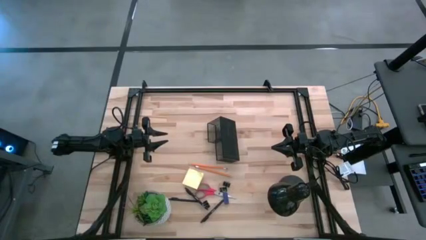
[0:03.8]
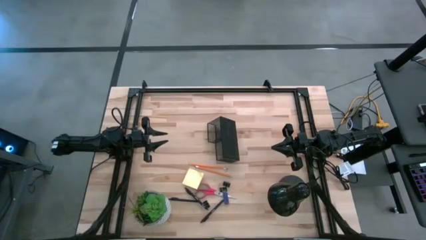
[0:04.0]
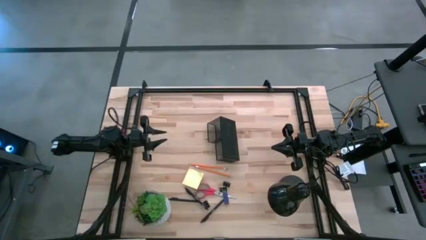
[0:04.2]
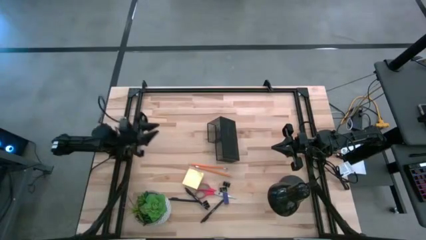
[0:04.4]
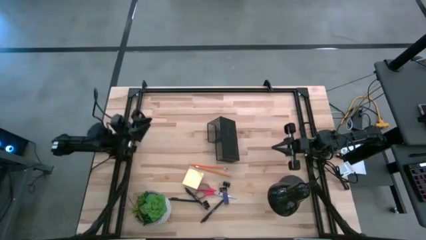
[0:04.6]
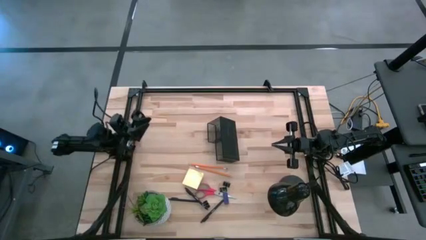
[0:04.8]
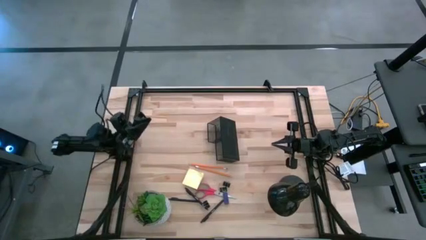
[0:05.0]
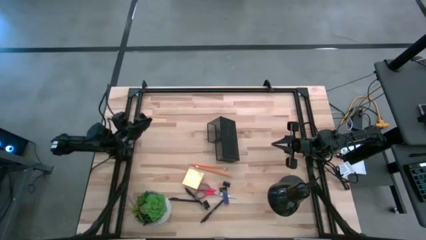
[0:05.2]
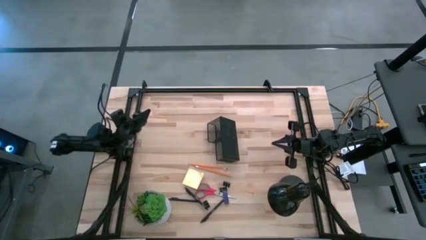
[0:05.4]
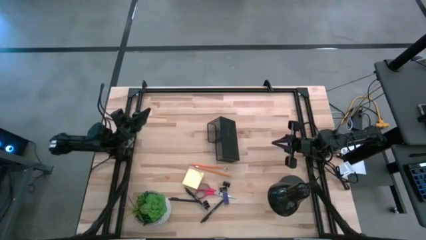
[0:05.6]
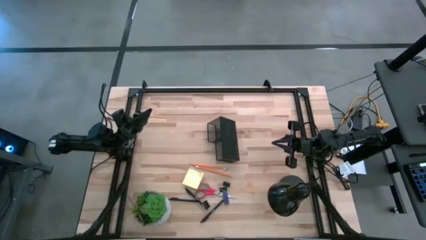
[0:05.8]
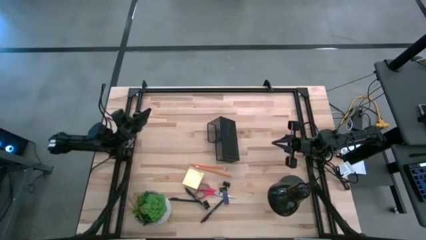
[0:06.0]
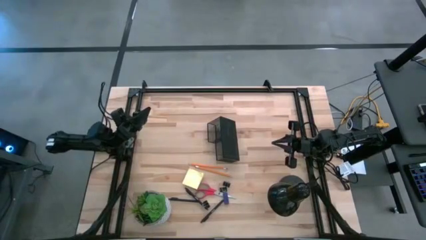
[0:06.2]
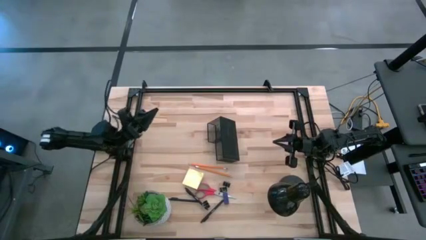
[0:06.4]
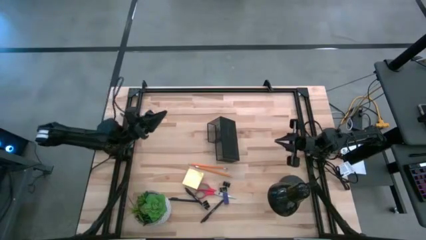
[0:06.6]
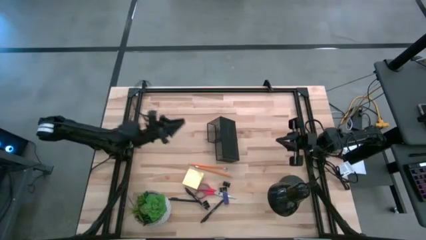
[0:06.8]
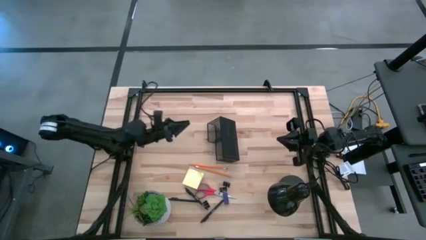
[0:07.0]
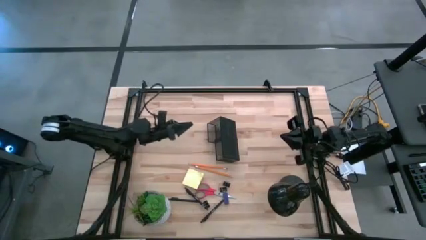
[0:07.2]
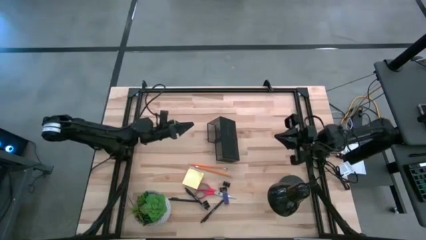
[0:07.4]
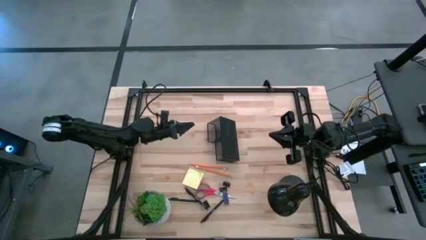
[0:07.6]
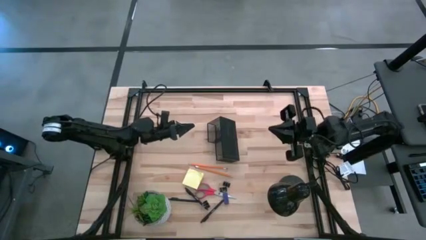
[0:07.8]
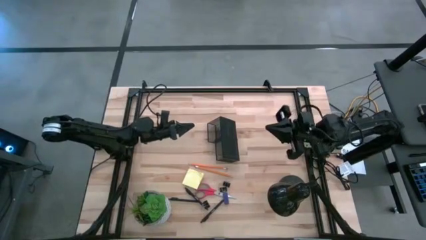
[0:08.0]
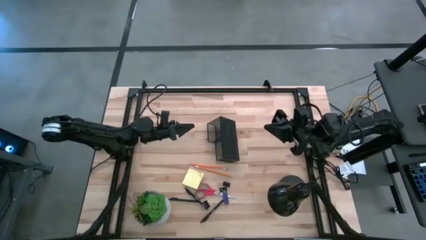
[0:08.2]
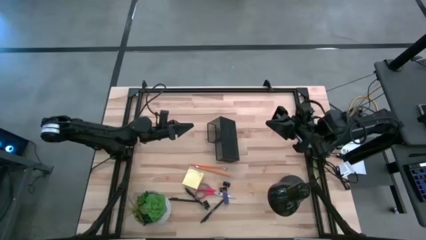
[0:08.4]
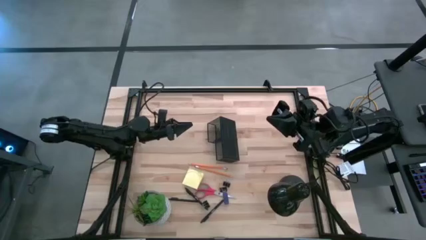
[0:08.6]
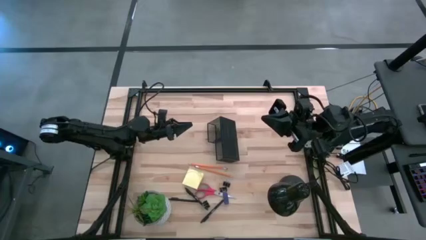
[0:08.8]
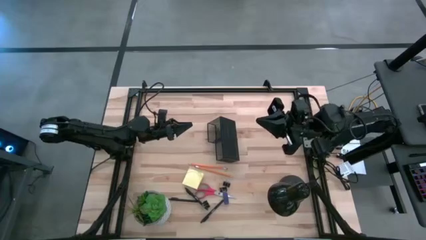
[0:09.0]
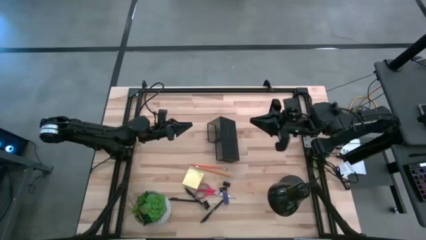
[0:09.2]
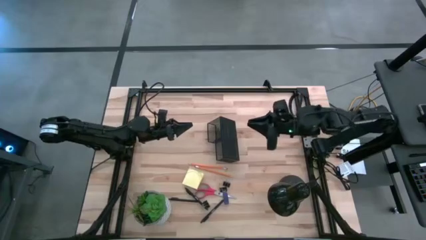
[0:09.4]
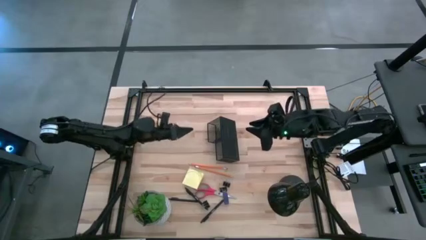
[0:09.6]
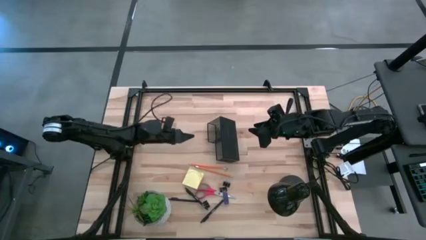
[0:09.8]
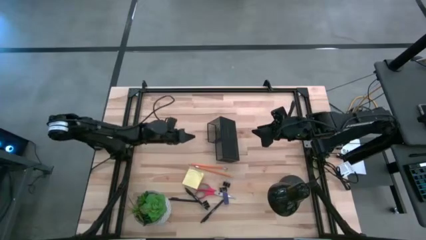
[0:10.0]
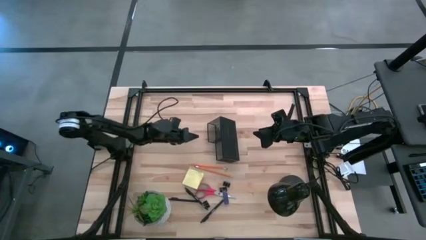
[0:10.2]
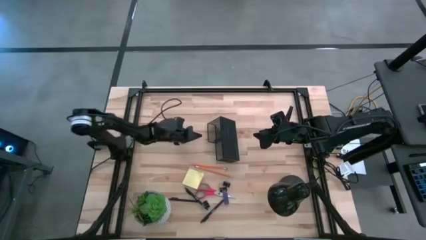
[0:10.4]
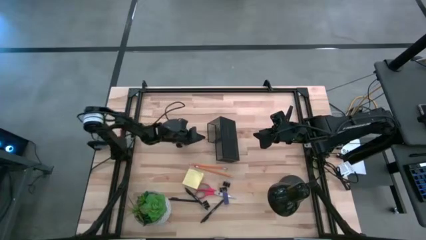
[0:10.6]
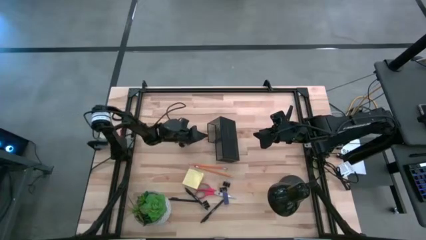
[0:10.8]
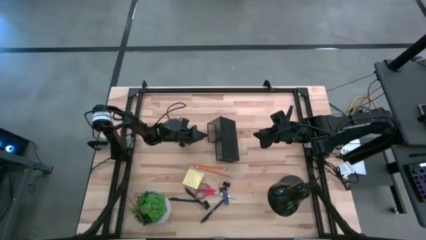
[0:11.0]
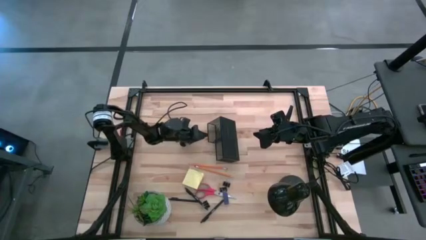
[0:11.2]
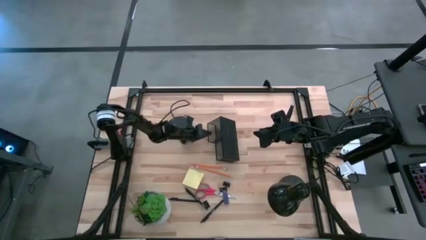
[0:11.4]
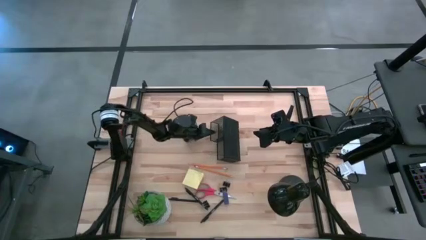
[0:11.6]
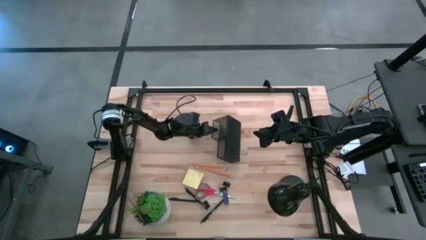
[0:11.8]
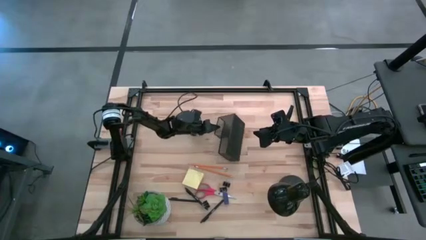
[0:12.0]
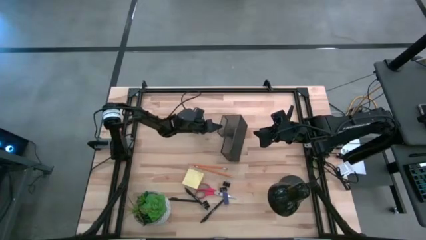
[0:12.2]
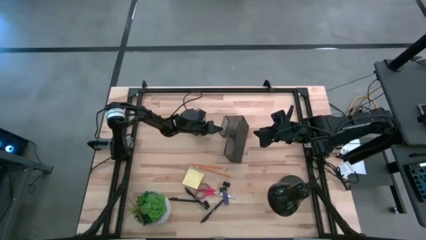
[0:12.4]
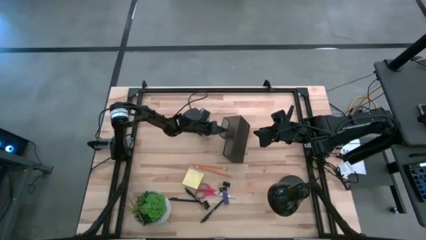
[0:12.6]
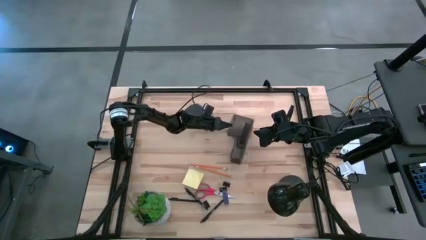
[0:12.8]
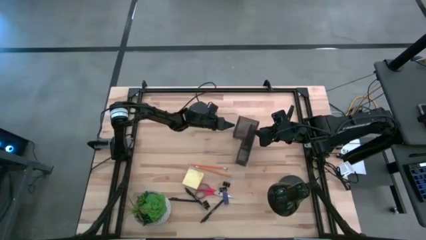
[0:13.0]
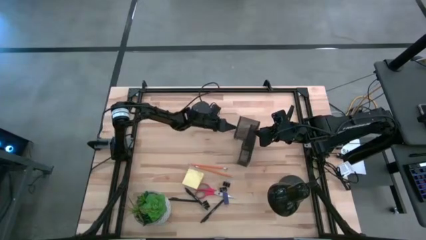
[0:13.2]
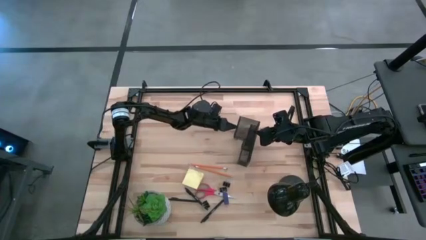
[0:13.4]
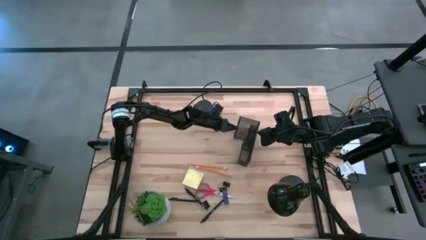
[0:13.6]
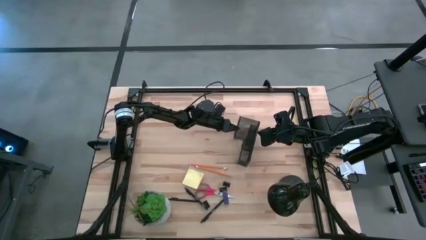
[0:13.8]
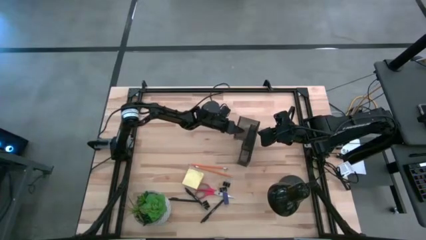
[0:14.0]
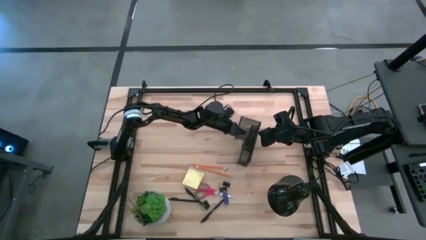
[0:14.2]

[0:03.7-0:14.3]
Task: Pick and place office supplies into organizer
Adjust the desk organizer
